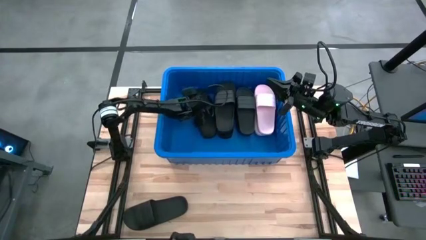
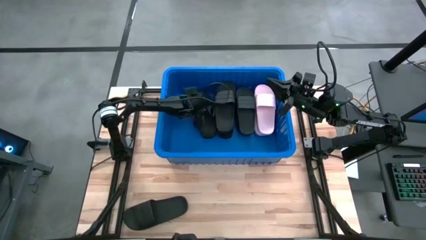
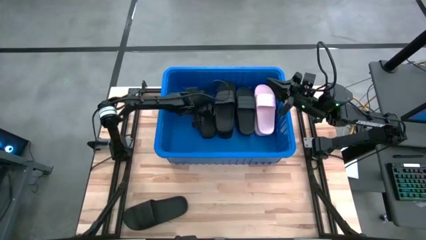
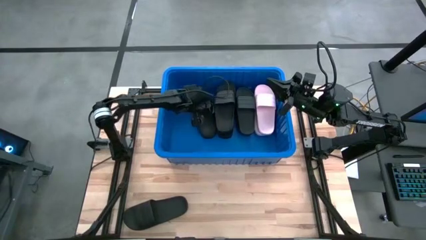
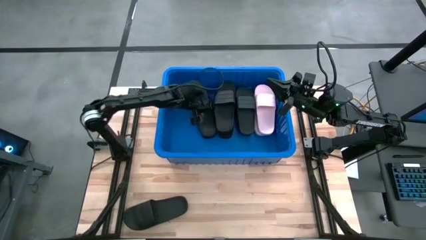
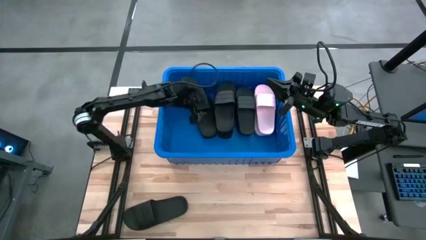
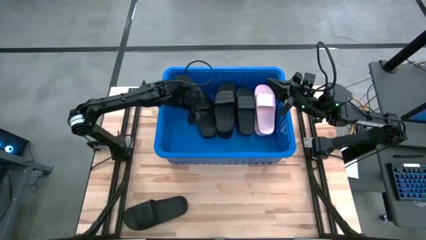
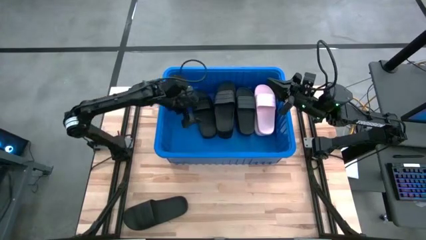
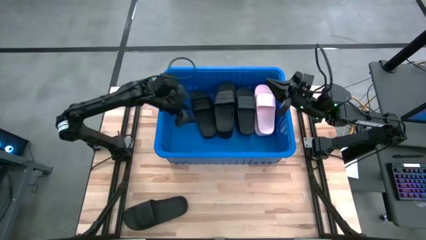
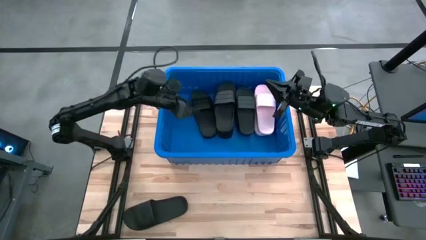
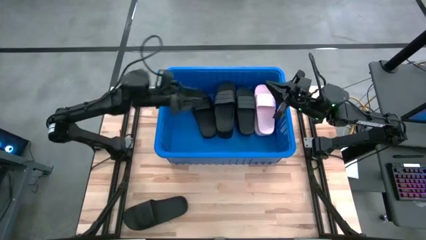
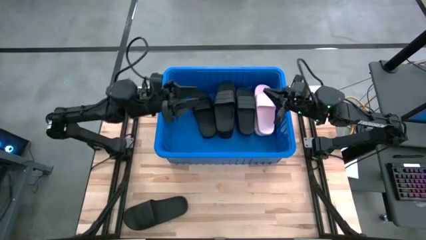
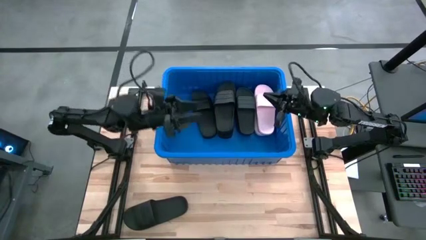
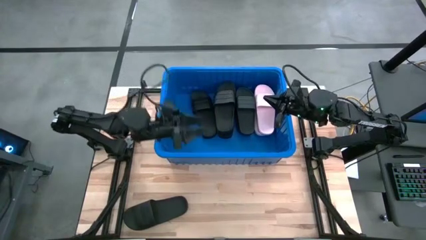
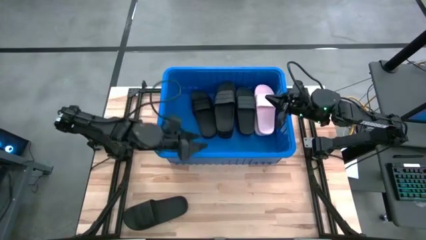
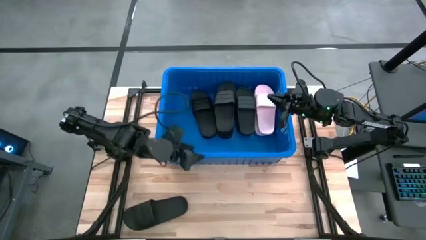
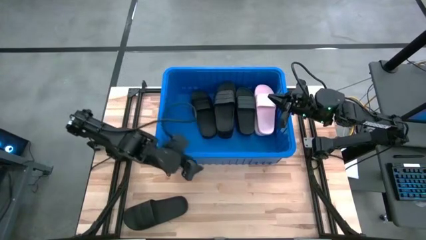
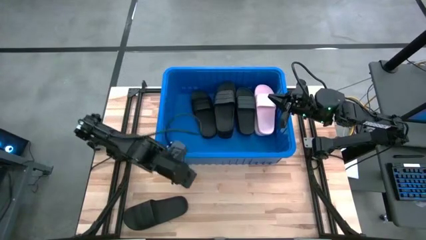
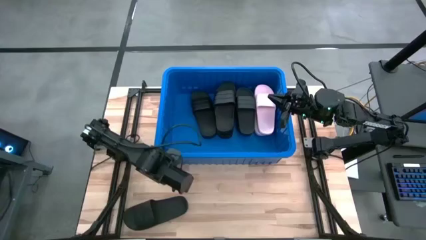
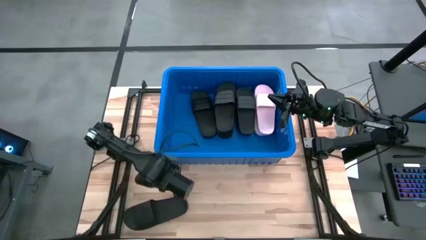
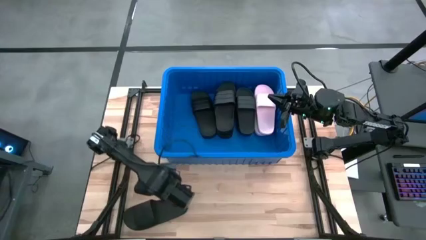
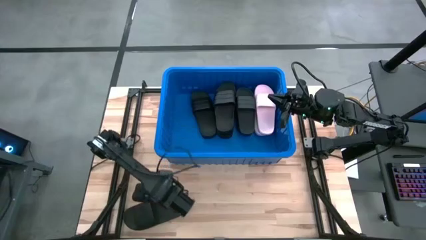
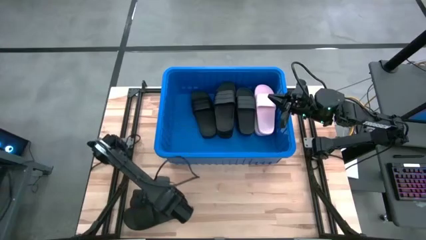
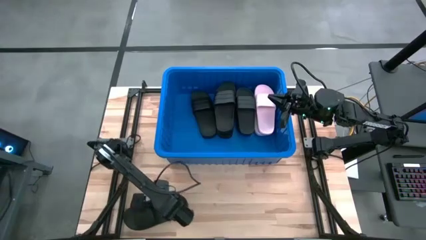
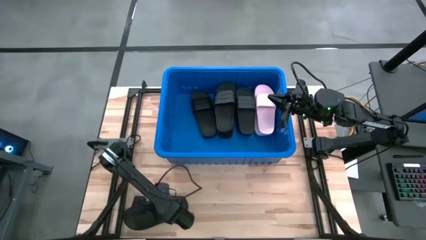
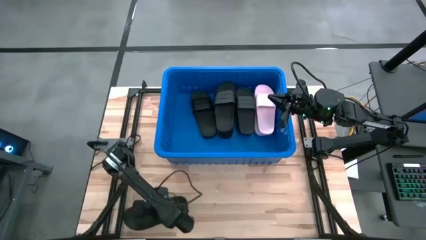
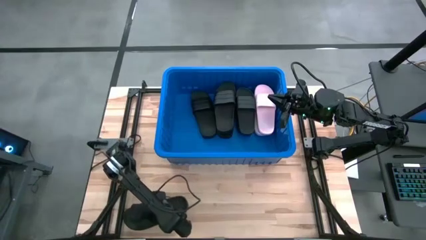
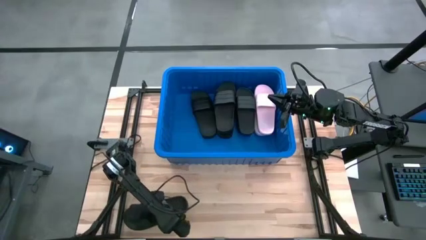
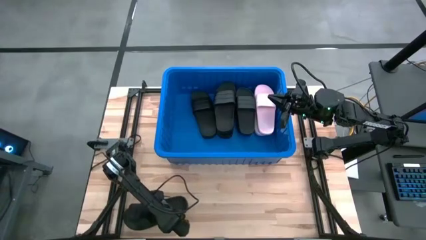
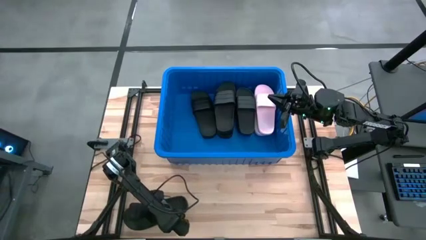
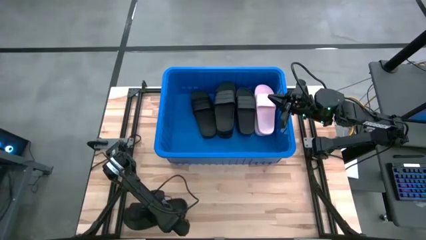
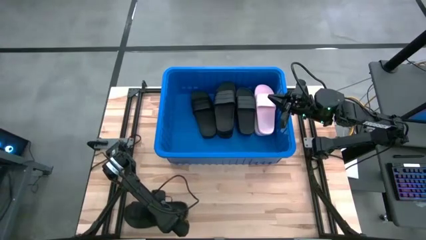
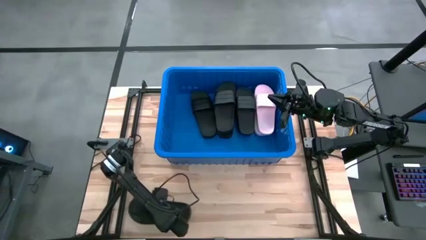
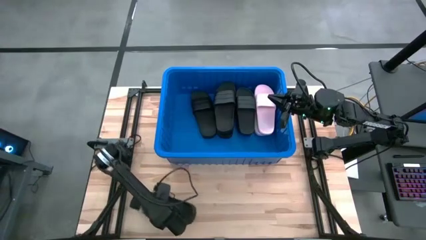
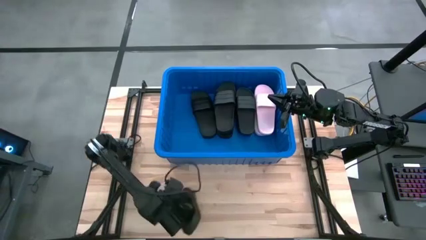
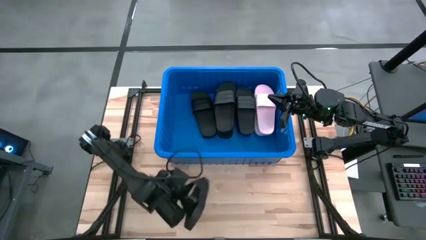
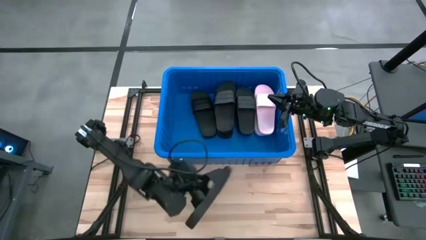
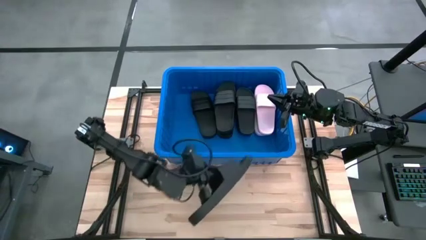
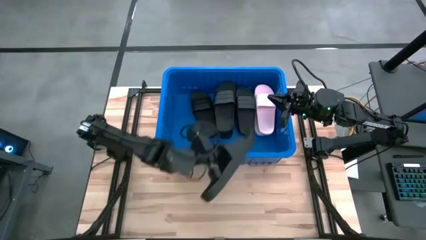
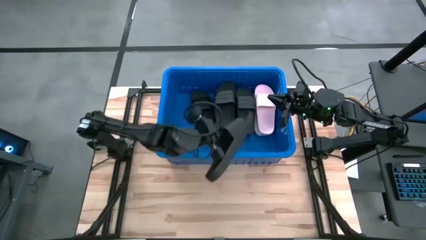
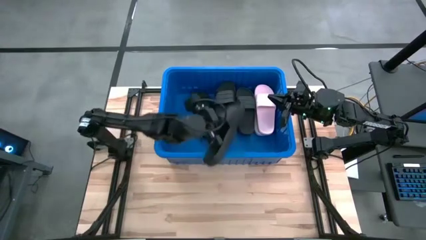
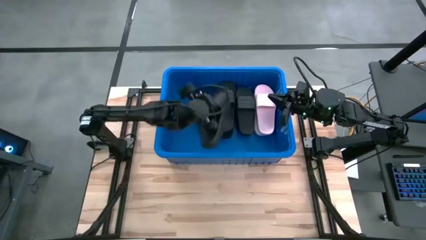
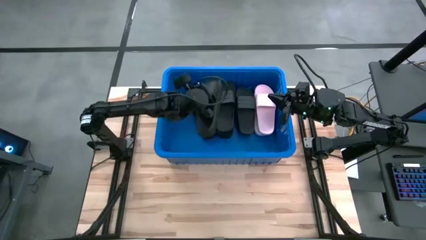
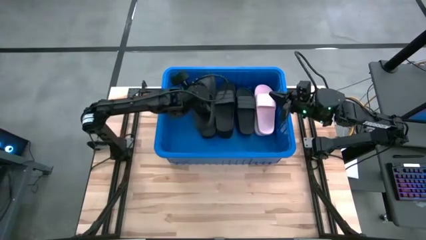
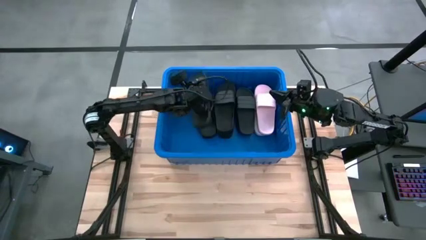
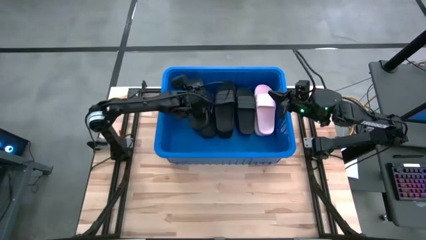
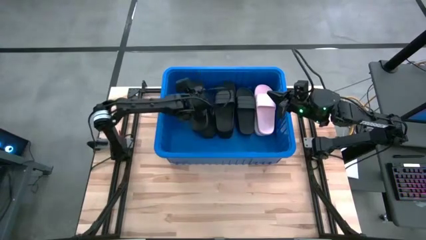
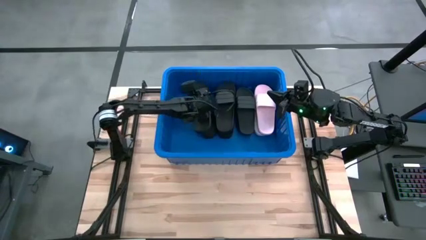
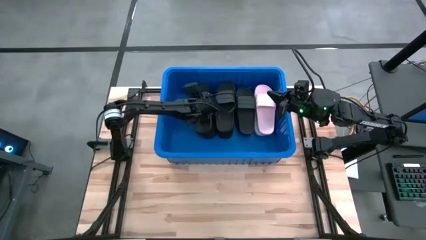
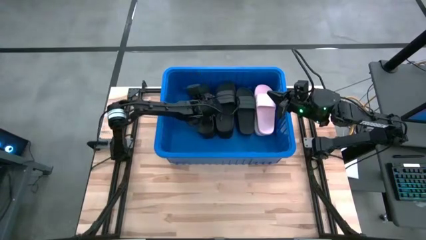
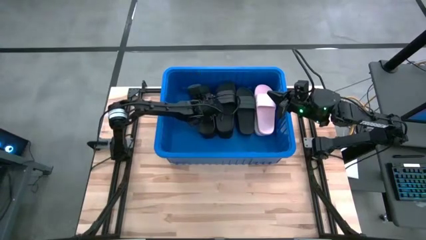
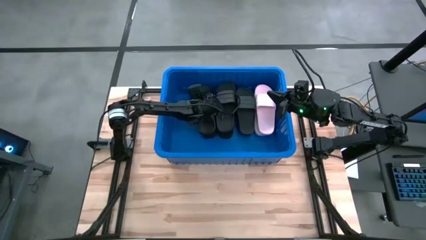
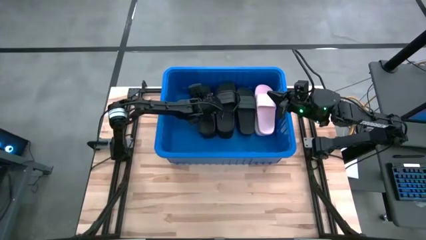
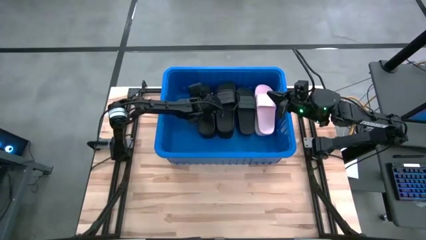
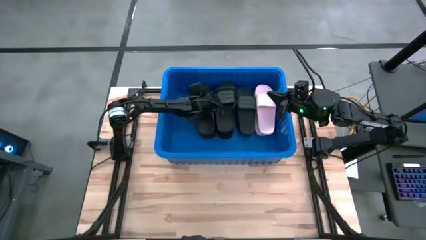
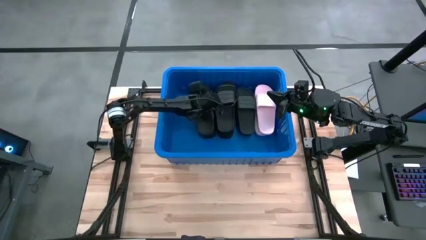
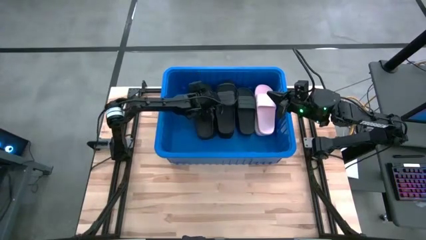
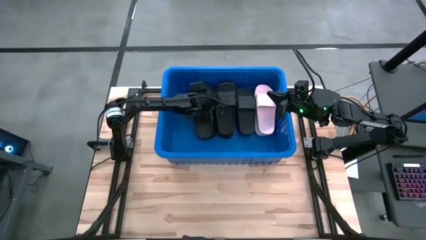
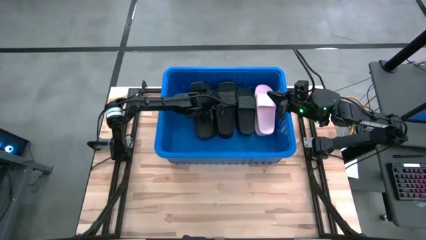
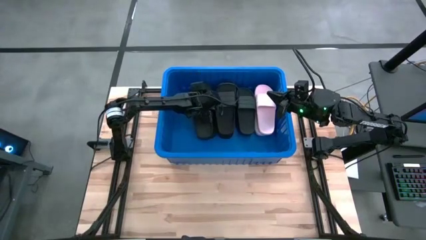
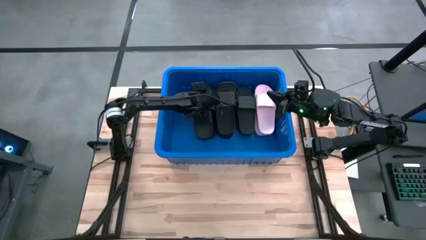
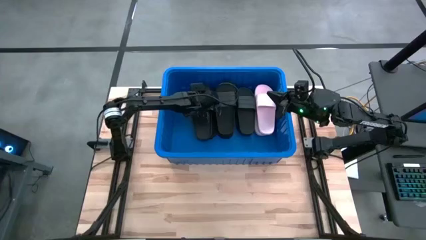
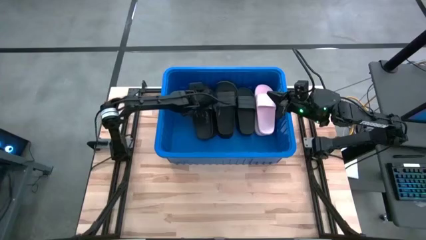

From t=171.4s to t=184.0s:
Task: Pick and place slides into bin
Stack the black slide on top of the black slide into the blue bin
